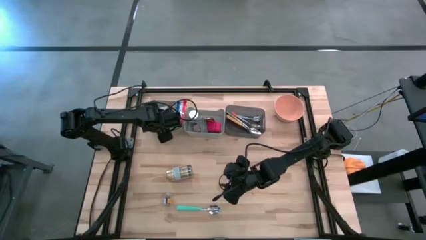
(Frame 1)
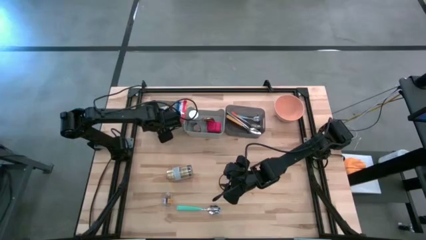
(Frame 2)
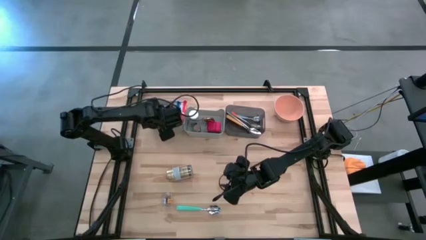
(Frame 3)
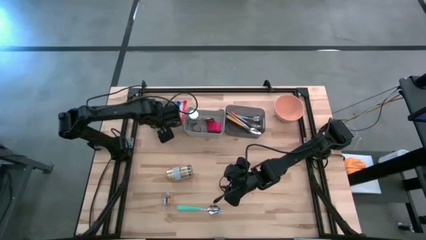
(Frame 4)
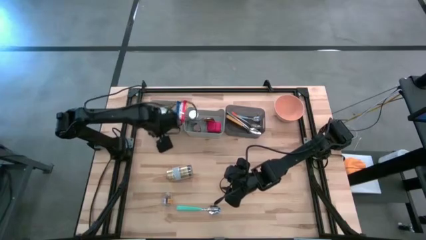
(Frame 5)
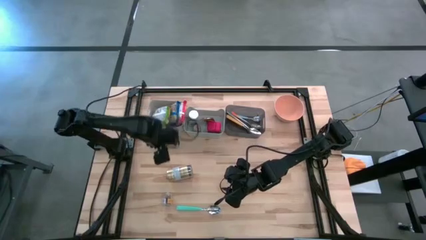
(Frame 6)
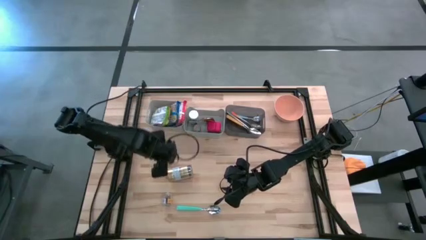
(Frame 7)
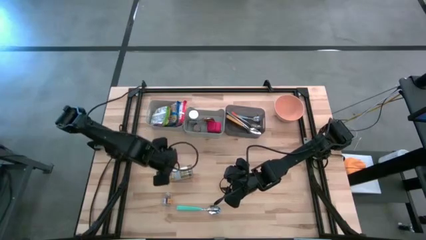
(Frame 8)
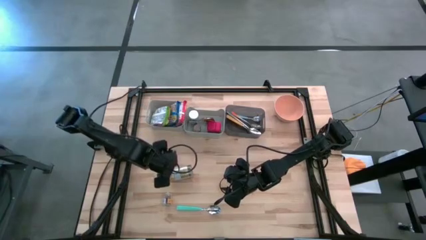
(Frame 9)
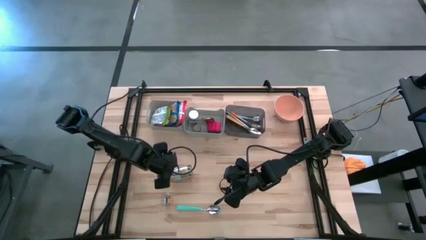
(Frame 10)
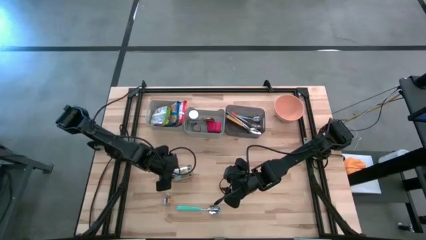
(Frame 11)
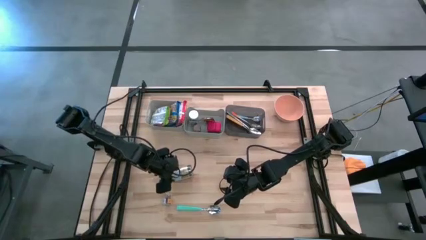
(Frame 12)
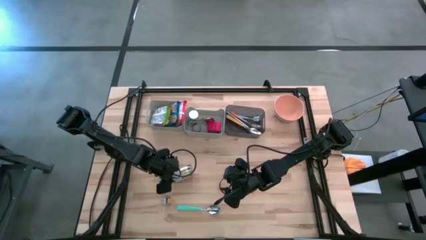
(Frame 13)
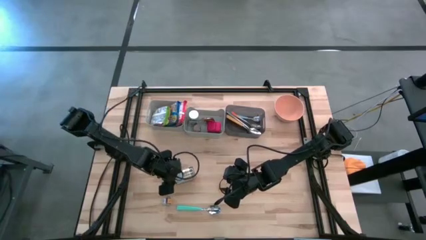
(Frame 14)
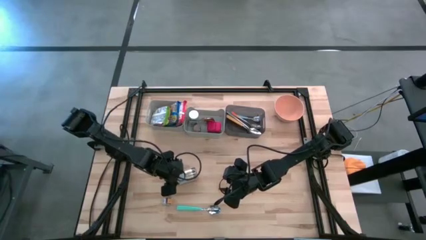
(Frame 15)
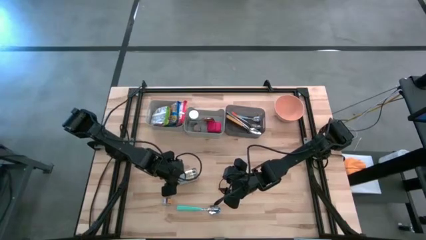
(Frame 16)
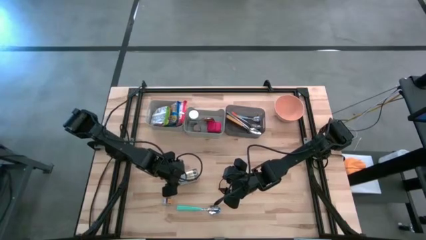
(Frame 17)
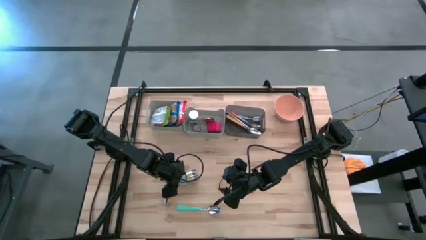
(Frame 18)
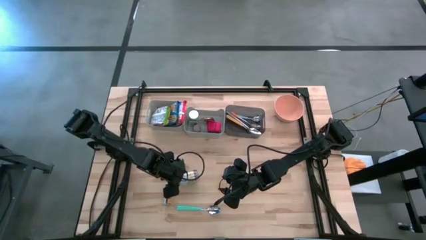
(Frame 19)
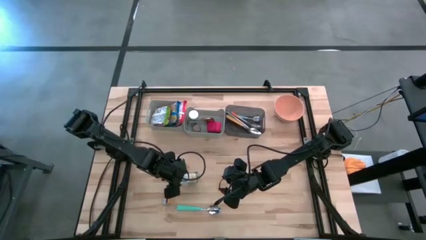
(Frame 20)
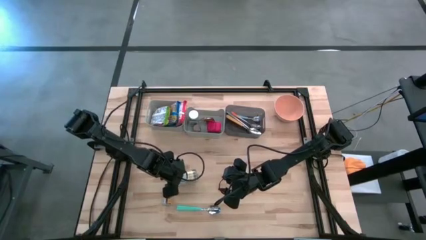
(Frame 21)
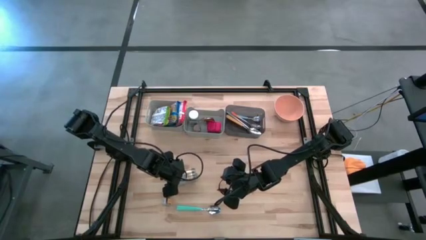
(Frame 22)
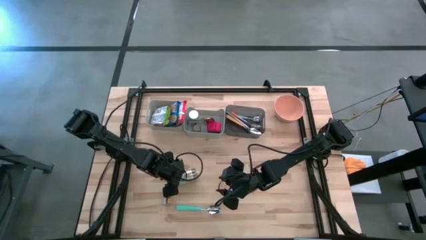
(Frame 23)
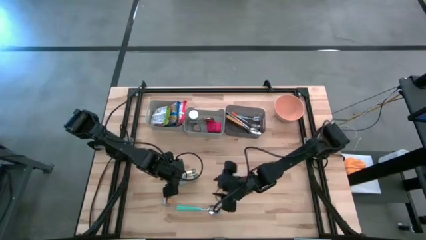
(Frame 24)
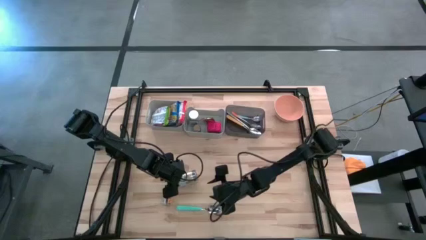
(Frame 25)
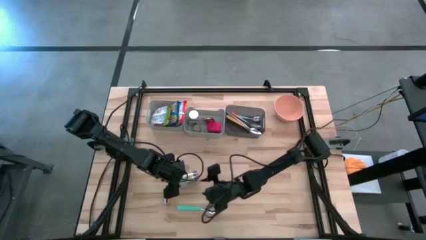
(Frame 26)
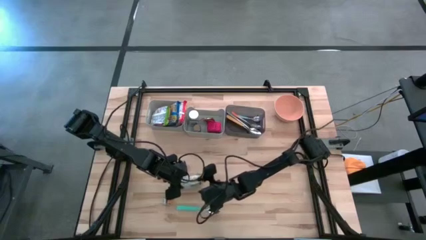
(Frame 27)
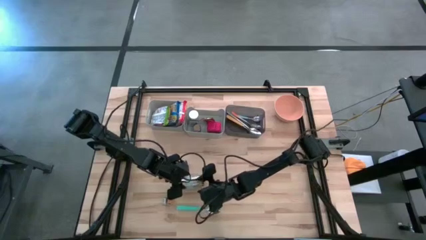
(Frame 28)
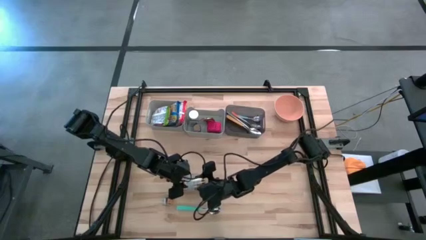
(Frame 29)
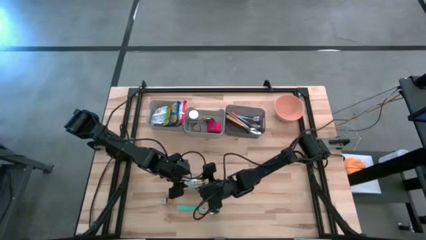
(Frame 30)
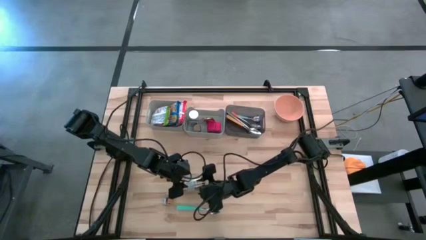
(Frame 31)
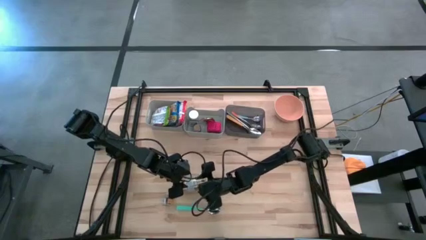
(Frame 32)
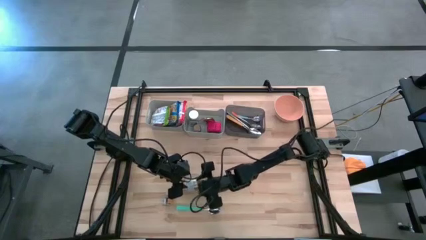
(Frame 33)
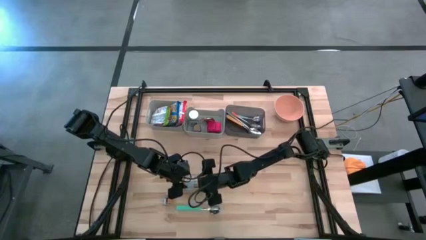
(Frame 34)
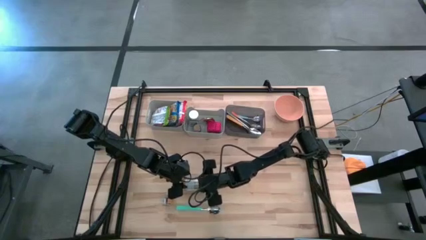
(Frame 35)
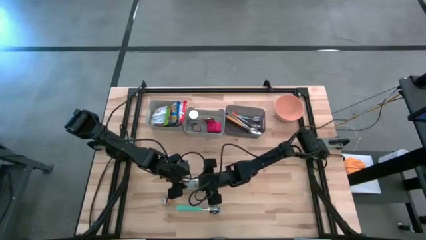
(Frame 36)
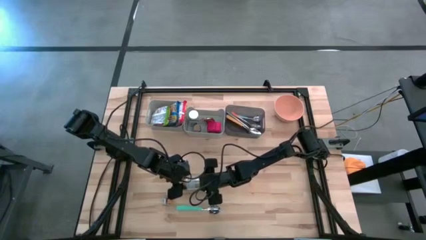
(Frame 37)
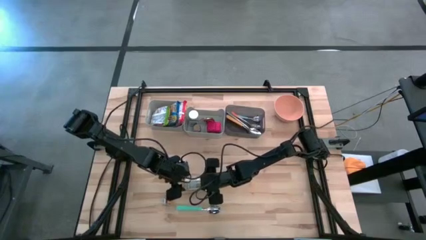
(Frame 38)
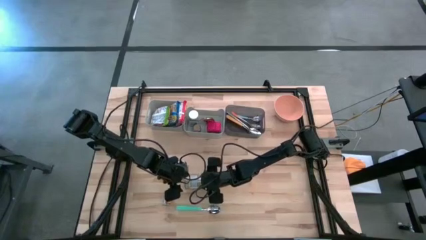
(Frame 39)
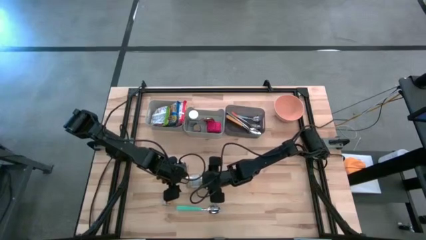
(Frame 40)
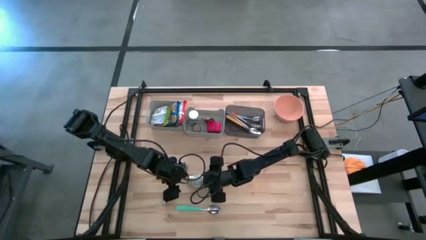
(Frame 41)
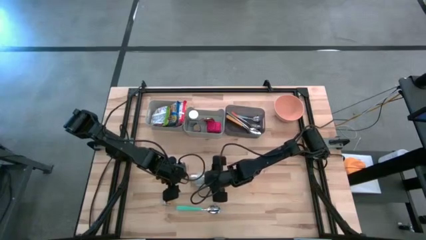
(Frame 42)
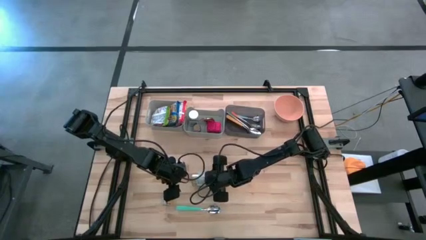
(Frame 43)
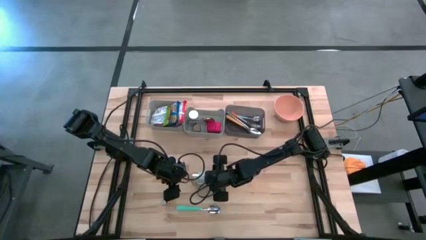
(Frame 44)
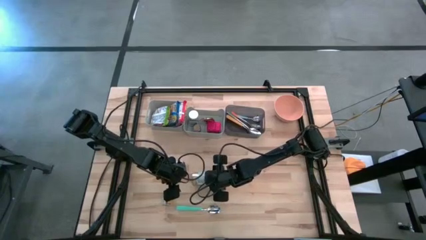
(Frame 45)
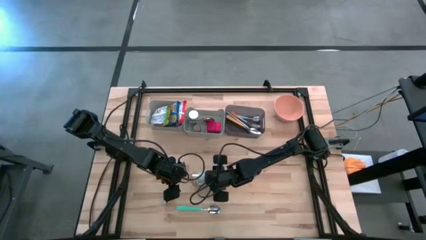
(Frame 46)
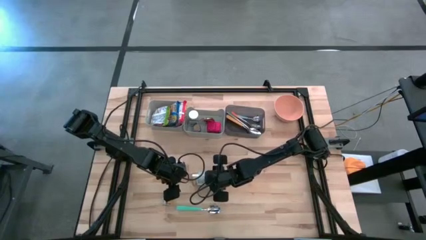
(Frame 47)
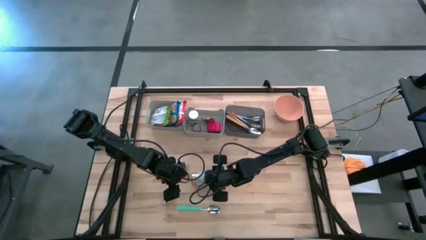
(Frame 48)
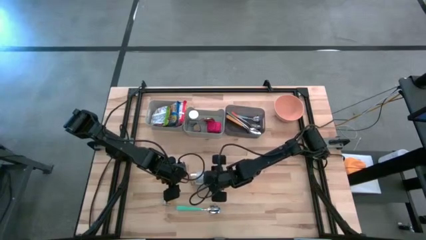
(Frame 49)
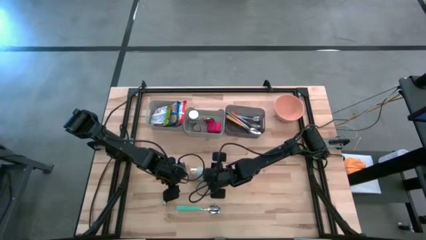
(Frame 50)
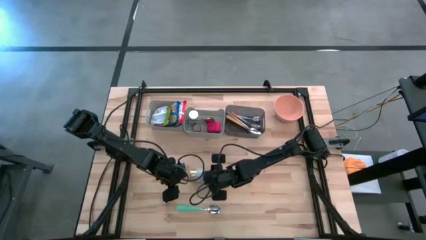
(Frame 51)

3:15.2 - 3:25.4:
Put the golden seasoning bottle into the right gray bin
